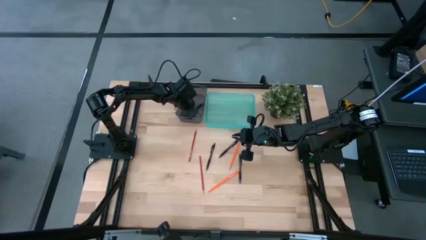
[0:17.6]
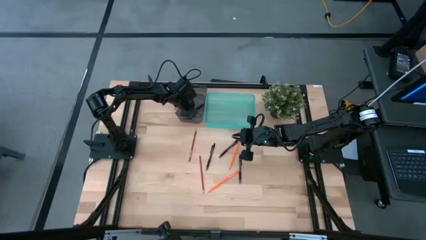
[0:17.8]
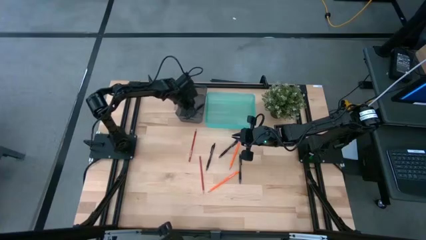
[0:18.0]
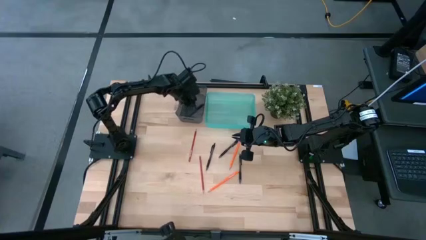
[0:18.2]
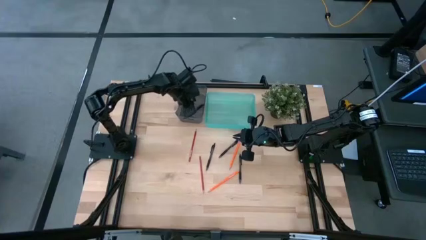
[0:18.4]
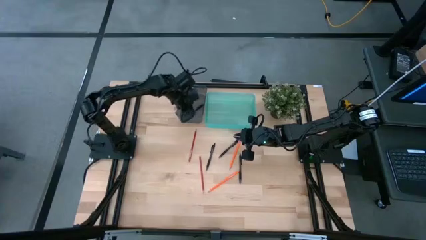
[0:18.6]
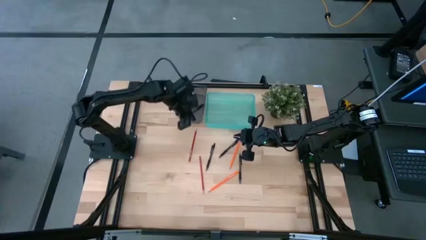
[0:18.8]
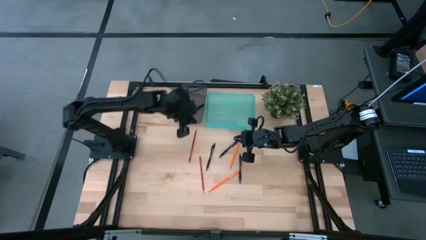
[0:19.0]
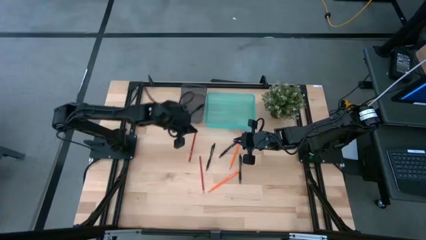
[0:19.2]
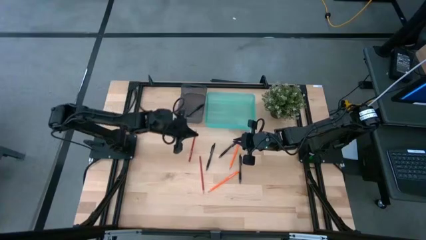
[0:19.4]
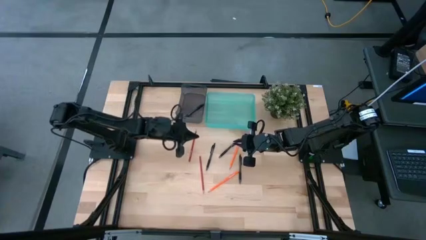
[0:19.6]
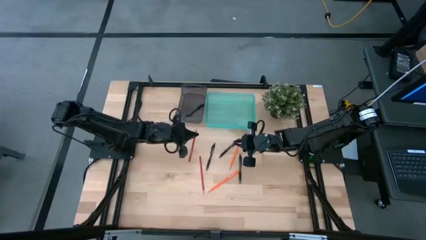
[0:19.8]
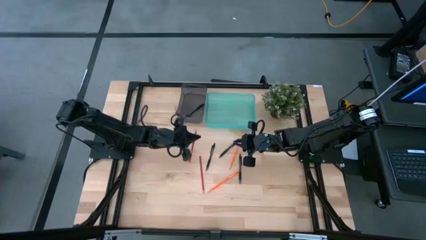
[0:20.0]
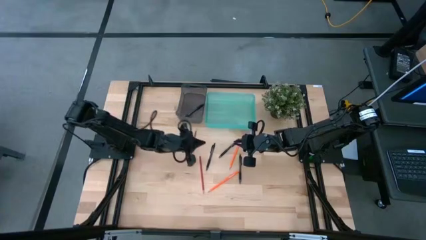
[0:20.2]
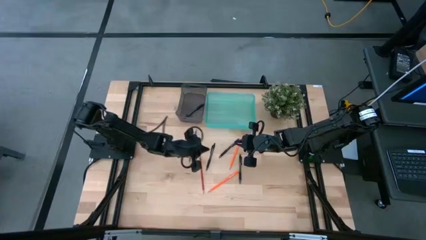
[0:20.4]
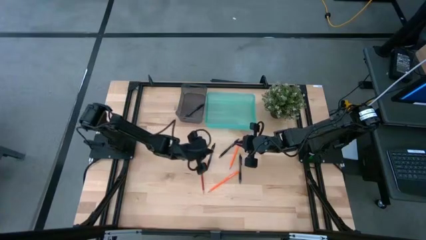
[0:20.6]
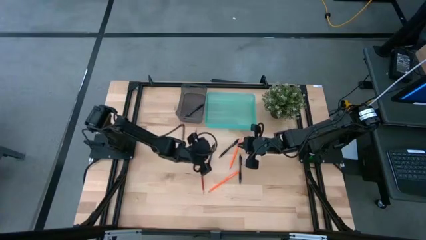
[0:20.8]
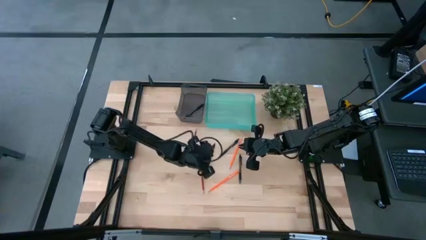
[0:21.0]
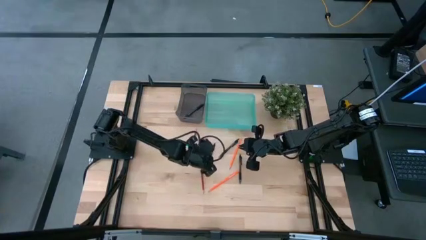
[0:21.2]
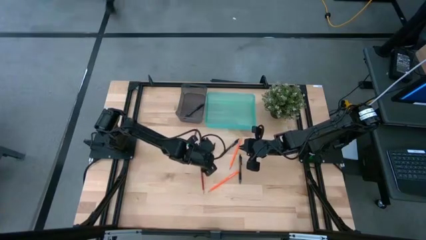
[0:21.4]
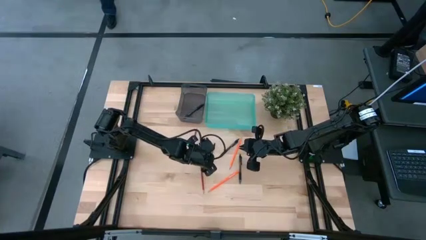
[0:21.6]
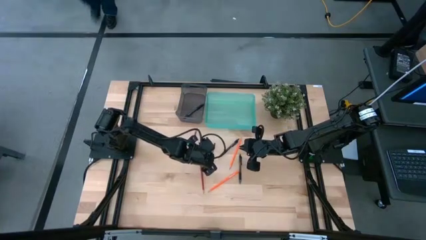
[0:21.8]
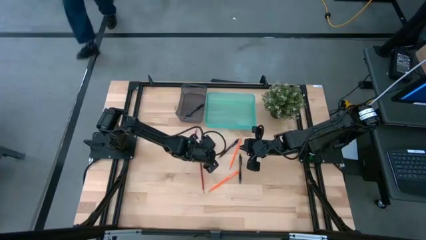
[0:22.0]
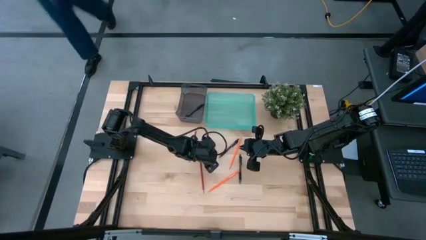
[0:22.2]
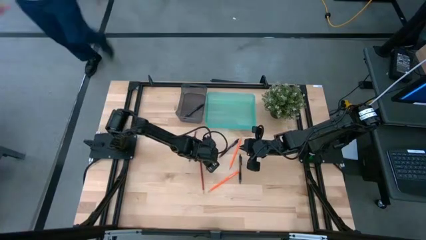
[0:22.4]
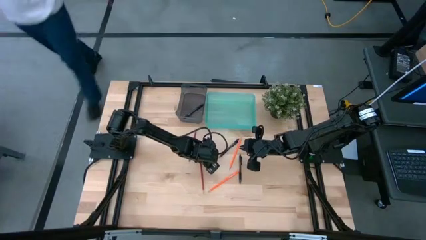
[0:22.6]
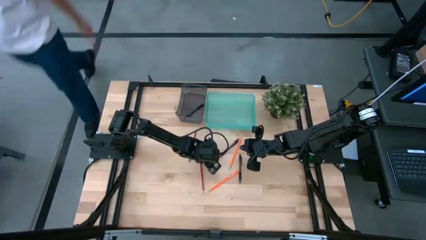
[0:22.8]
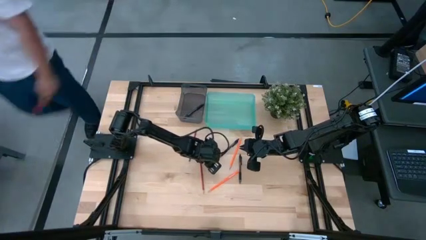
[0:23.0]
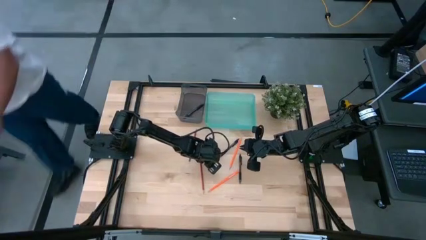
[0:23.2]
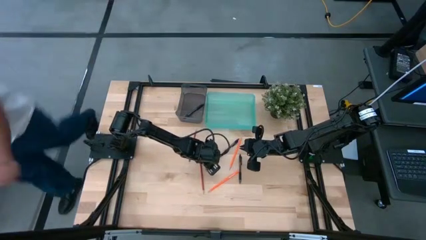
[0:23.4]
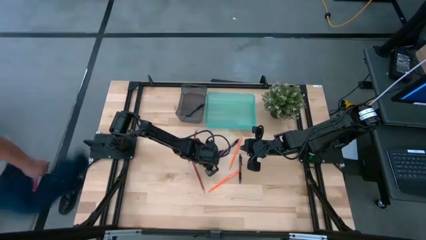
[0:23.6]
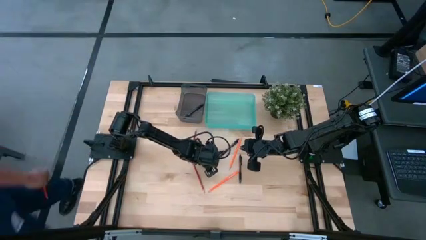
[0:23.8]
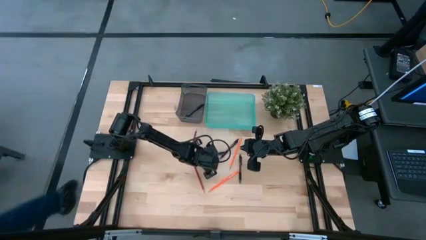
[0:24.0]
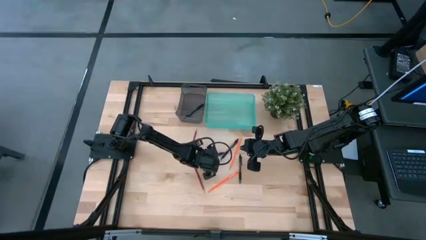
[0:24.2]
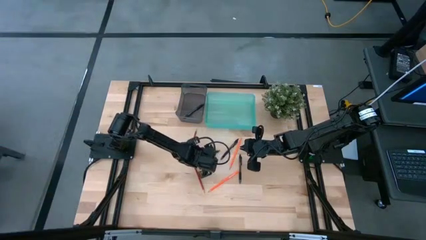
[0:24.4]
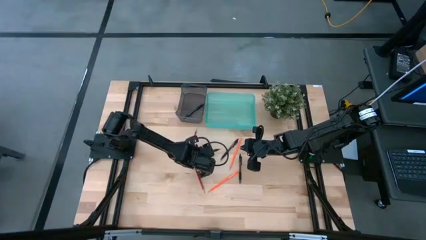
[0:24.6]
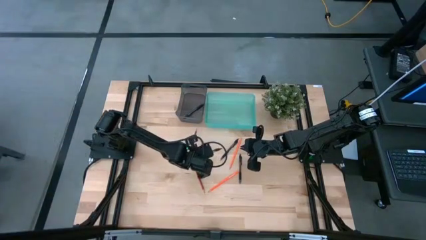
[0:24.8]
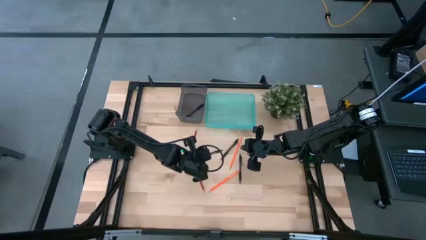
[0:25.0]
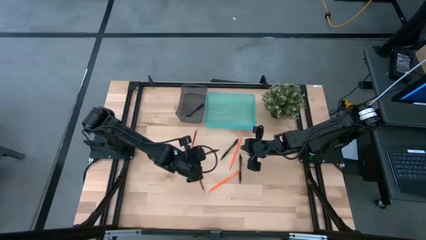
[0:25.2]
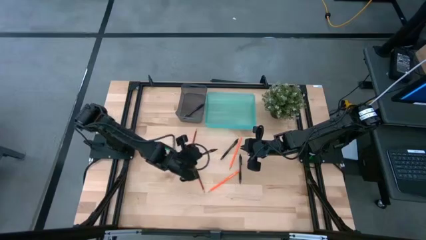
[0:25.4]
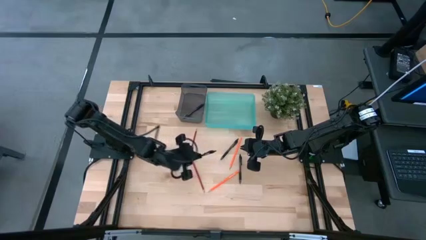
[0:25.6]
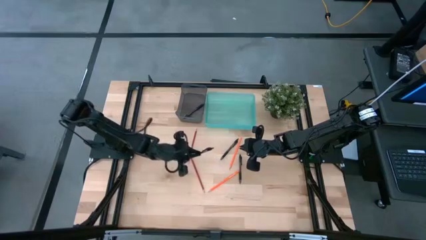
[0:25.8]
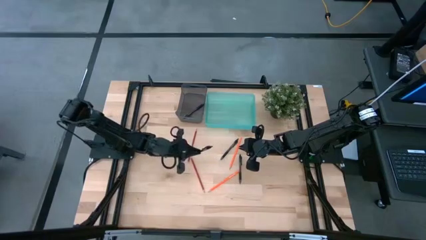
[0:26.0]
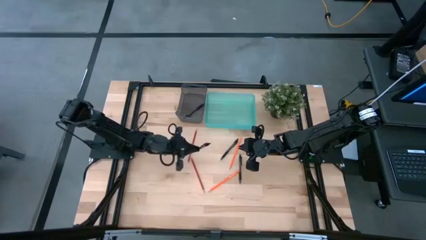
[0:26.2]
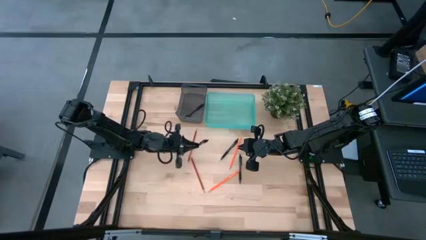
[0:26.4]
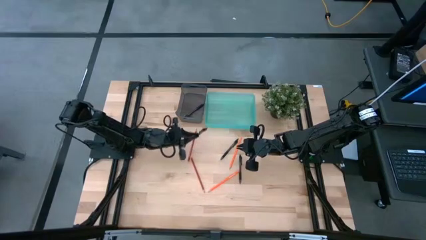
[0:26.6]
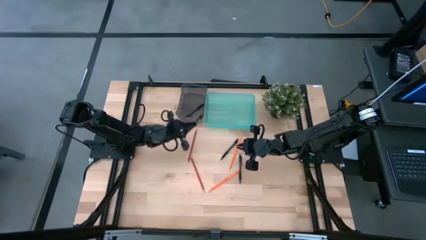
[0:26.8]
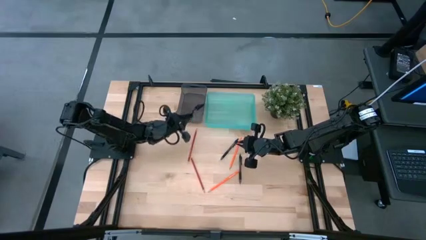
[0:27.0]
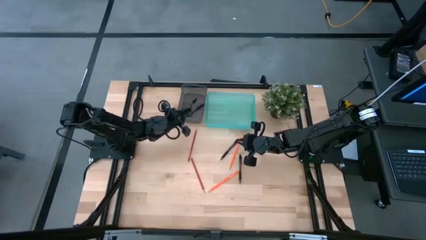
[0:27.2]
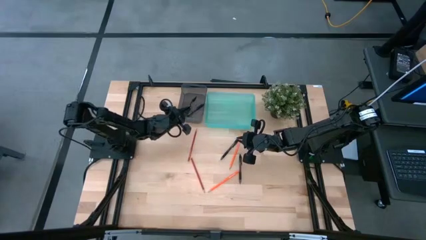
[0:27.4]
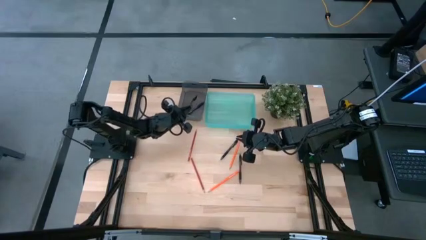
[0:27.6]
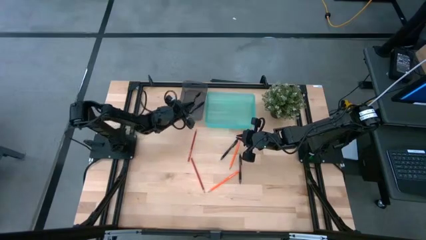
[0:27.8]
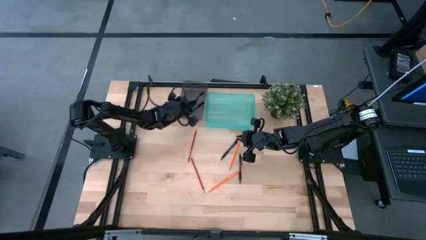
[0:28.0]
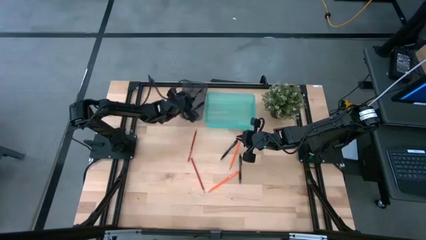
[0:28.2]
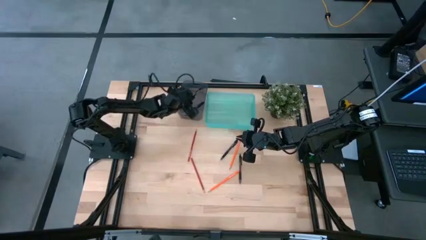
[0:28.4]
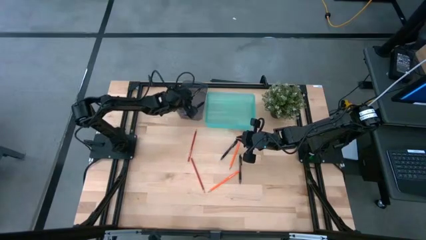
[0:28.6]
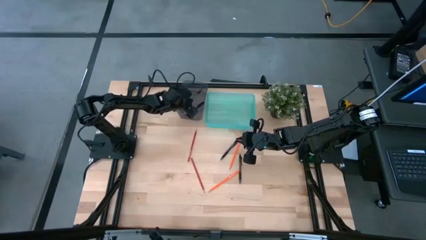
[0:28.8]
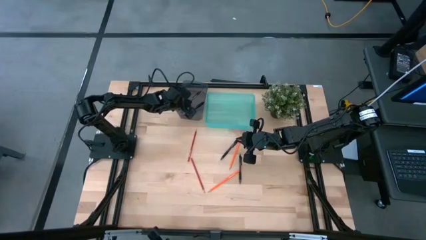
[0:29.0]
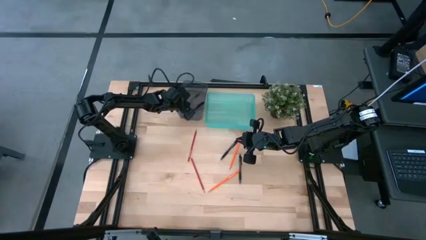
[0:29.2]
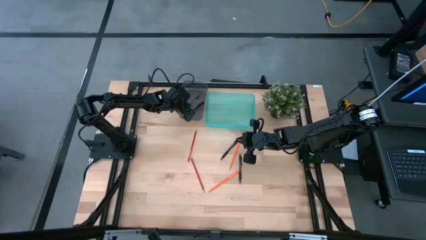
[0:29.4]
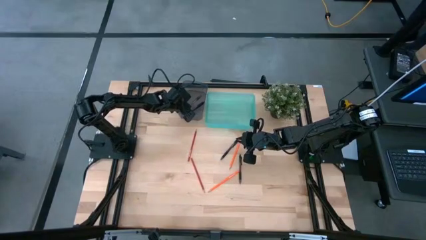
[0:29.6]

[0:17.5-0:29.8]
Task: Sort pens & pencils
Put the black pen into the black bin

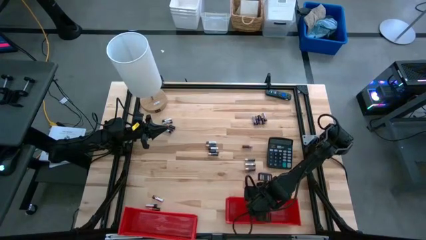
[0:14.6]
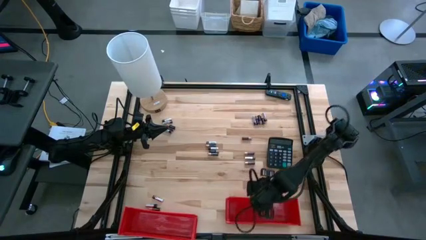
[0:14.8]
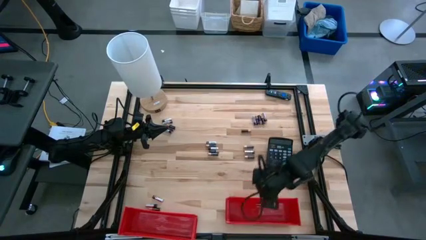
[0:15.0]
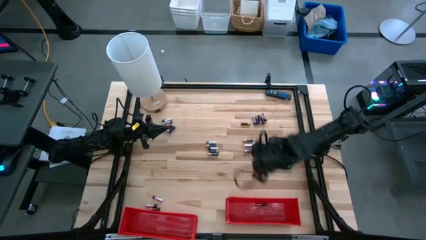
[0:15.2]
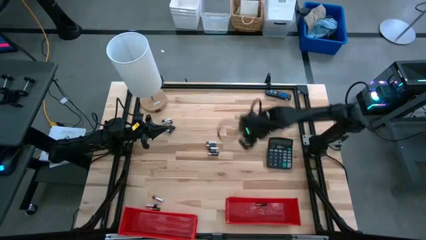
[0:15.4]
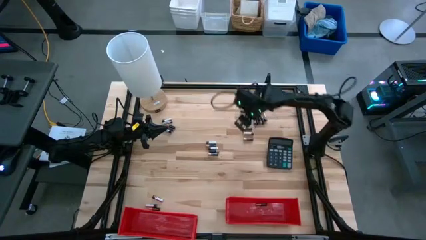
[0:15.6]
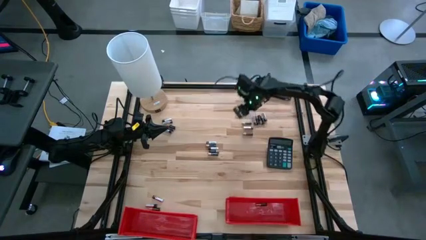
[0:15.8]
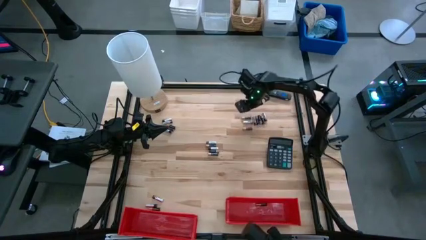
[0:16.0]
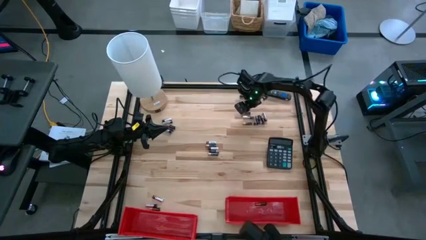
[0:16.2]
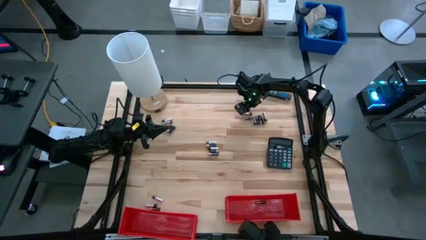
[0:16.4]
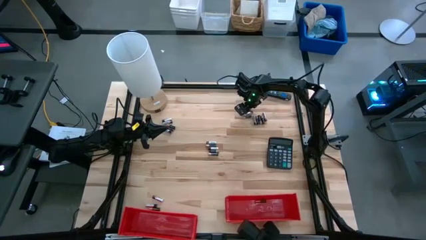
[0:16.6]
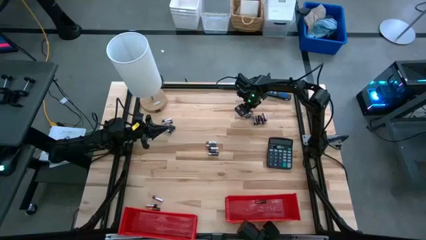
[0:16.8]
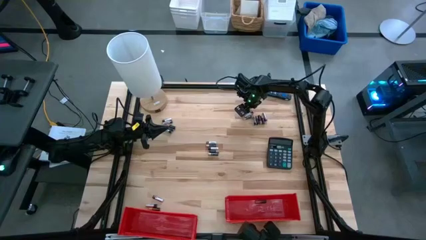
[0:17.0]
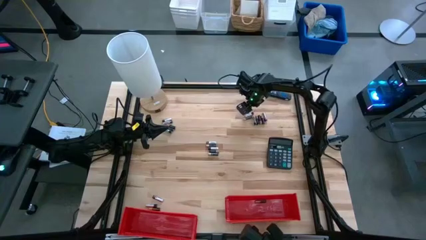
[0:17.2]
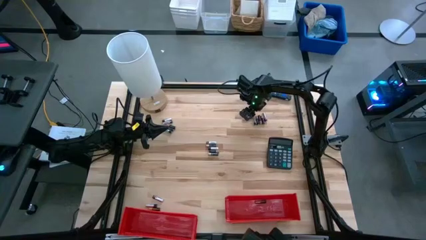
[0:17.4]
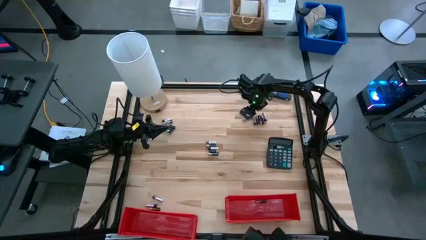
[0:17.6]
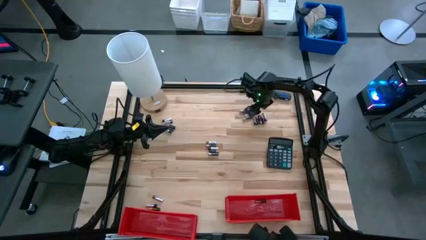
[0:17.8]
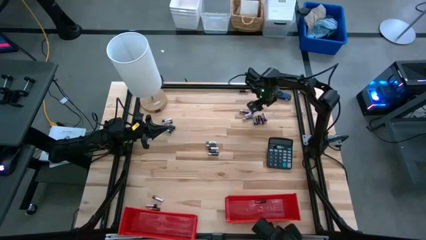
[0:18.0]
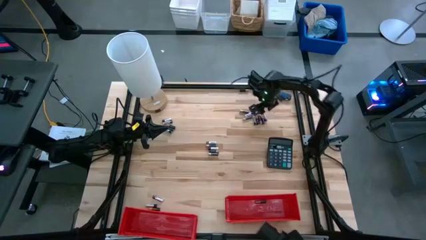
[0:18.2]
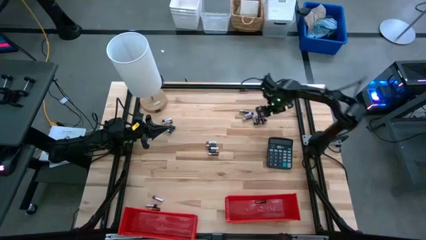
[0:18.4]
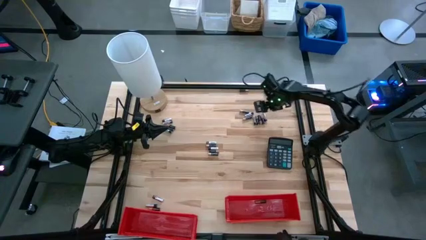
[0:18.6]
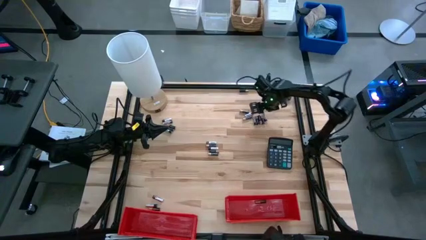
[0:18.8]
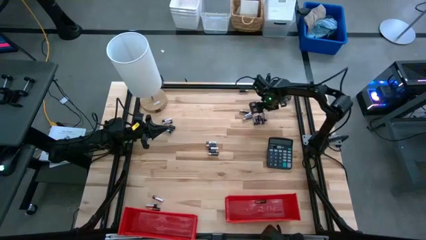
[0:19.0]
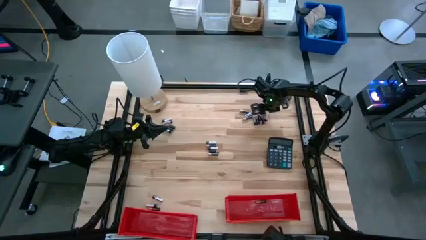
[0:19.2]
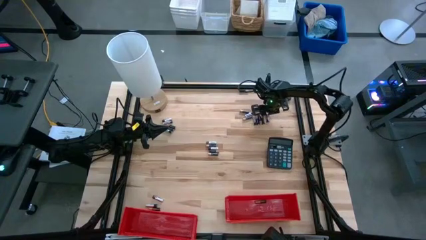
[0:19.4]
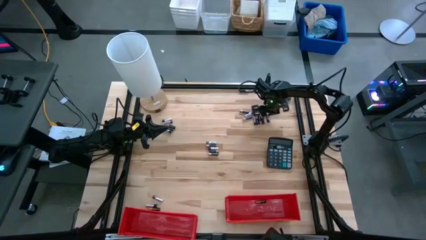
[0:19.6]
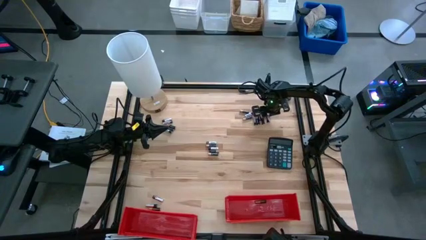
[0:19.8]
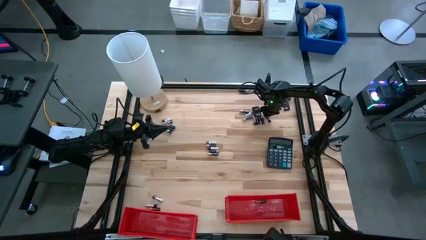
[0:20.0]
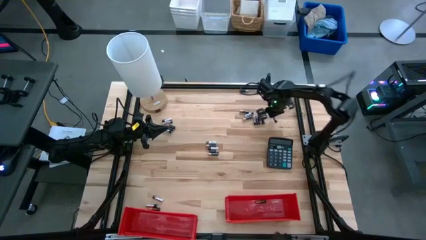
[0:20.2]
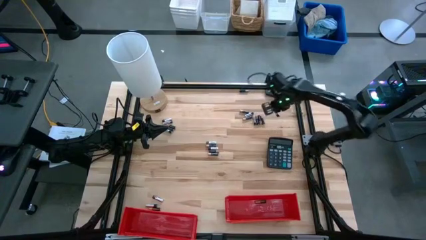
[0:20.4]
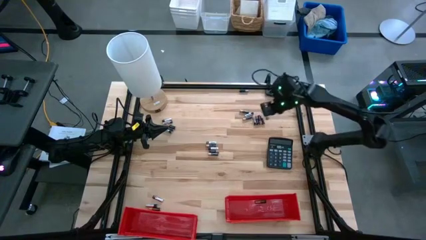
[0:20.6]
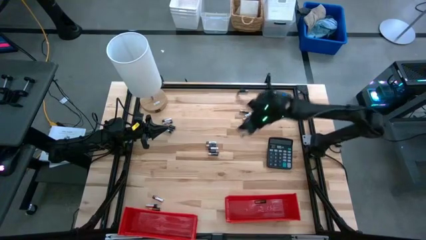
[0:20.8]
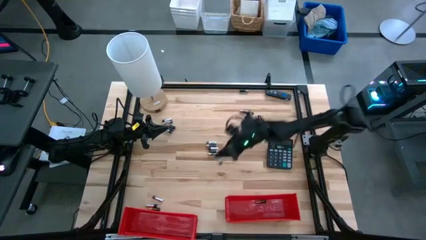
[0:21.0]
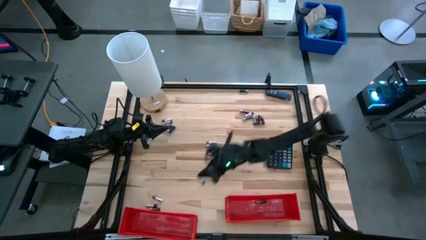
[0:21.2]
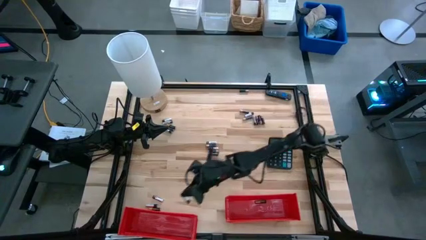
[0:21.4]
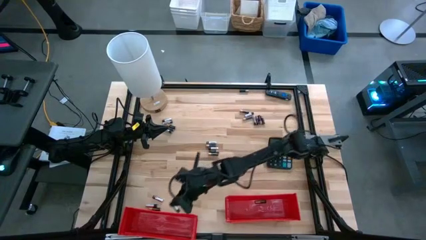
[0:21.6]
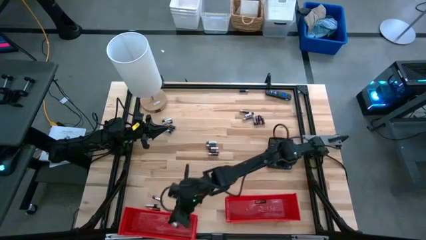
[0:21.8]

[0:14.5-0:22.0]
Task: Sort batteries
Put the silver battery into the red left bin
